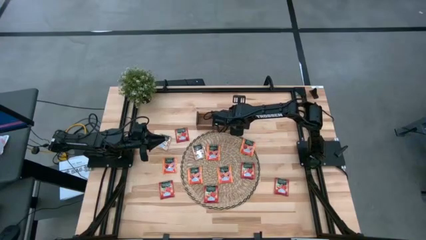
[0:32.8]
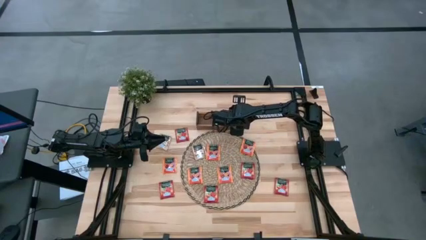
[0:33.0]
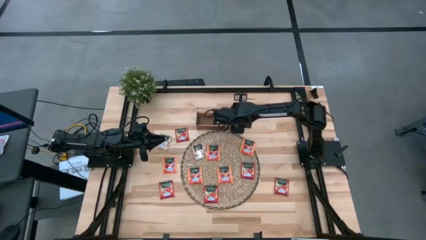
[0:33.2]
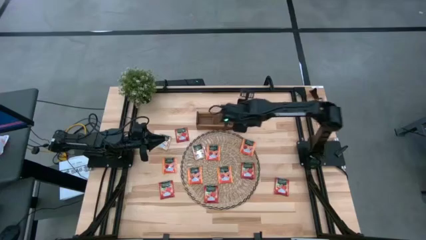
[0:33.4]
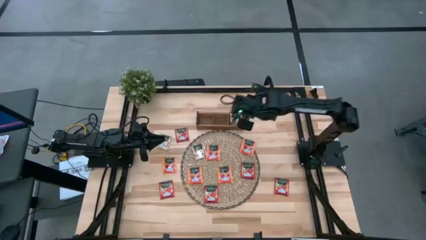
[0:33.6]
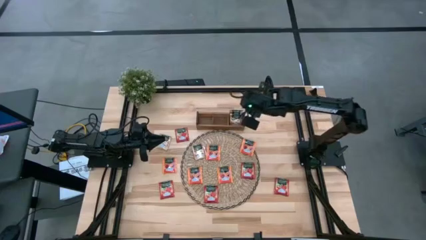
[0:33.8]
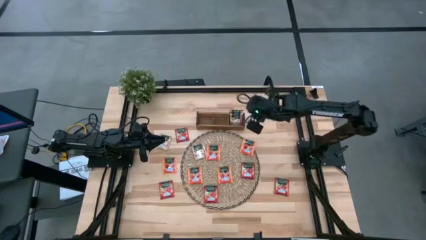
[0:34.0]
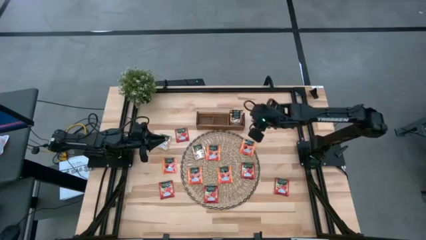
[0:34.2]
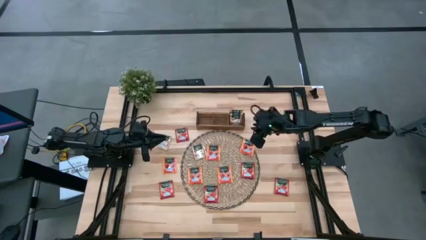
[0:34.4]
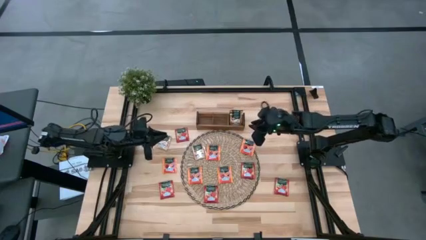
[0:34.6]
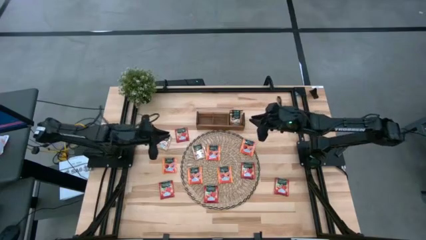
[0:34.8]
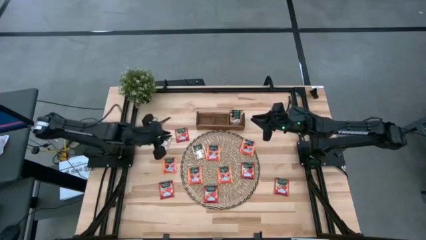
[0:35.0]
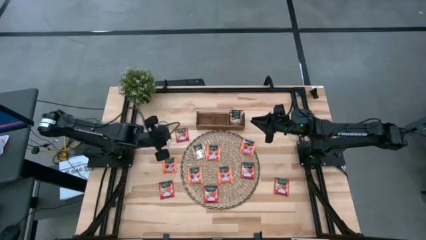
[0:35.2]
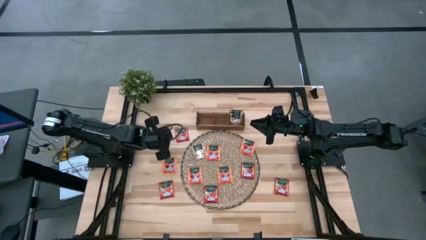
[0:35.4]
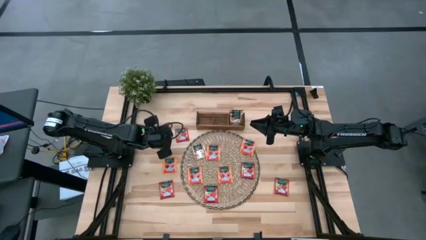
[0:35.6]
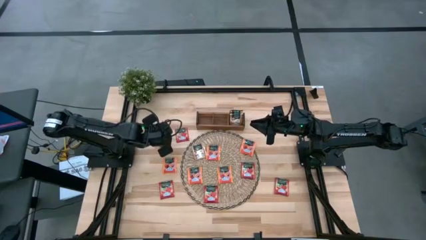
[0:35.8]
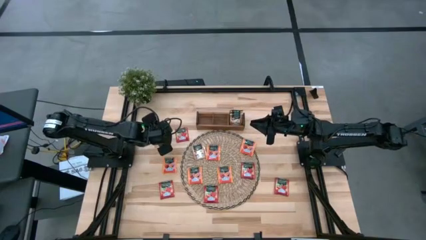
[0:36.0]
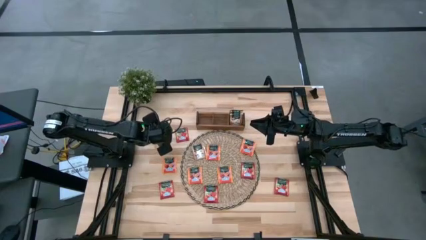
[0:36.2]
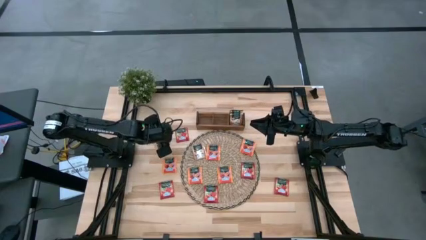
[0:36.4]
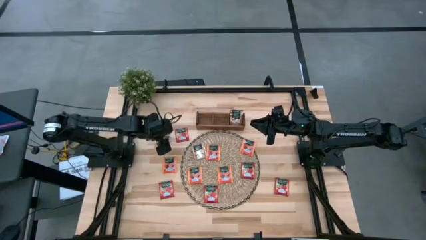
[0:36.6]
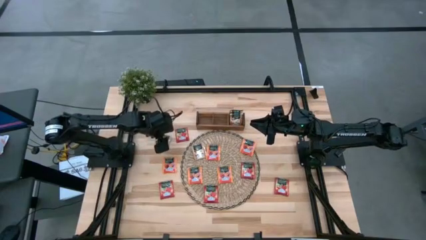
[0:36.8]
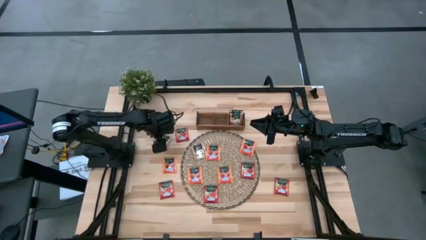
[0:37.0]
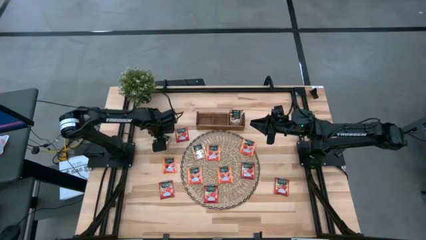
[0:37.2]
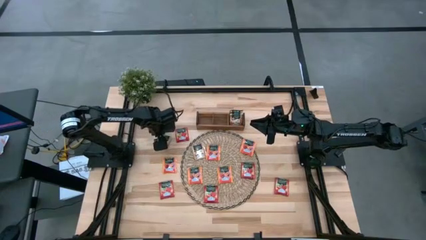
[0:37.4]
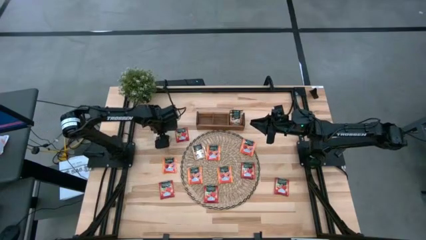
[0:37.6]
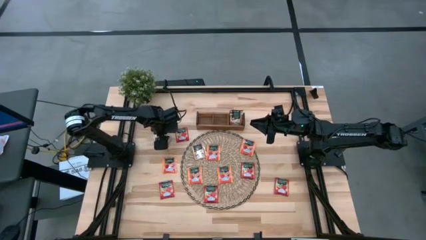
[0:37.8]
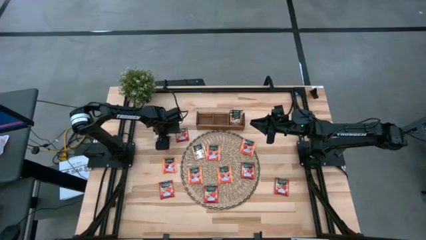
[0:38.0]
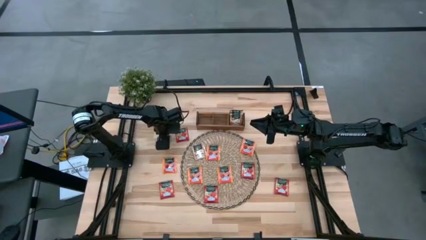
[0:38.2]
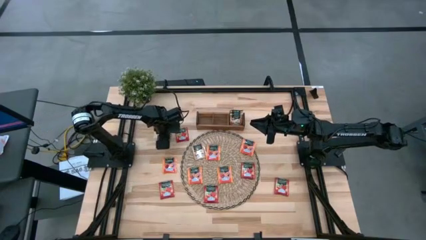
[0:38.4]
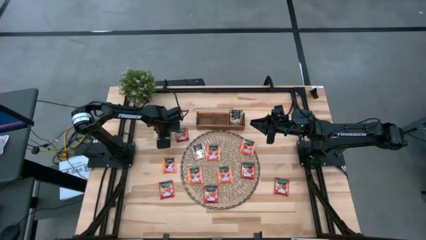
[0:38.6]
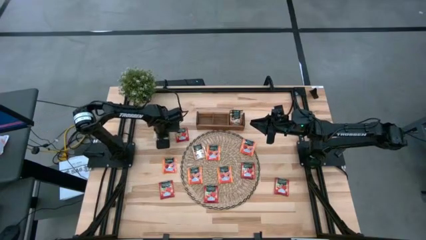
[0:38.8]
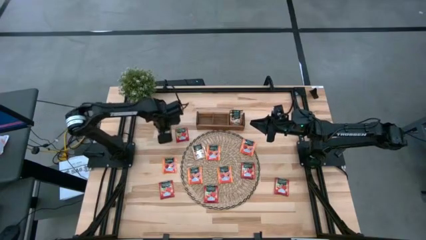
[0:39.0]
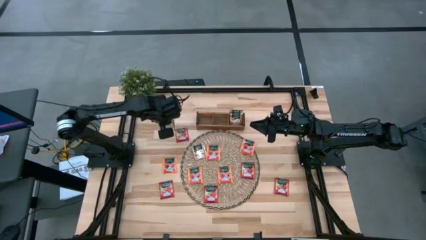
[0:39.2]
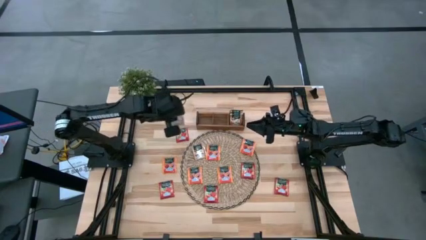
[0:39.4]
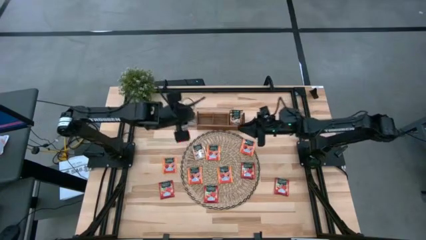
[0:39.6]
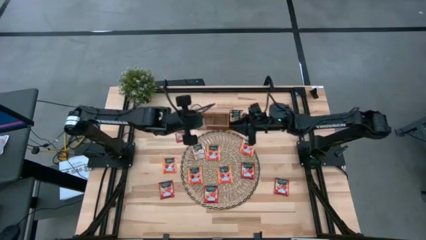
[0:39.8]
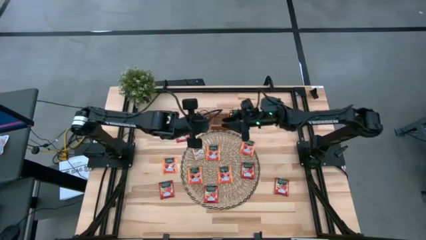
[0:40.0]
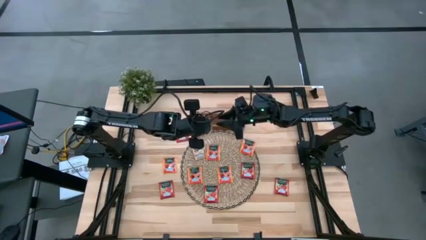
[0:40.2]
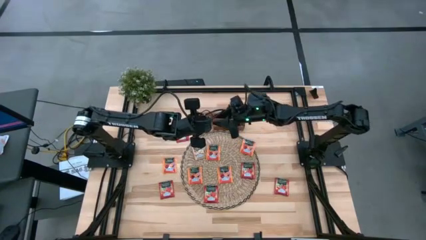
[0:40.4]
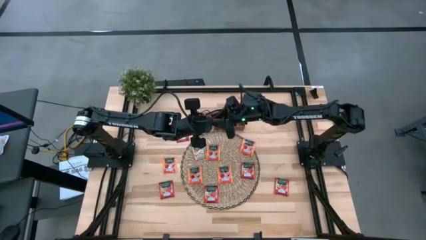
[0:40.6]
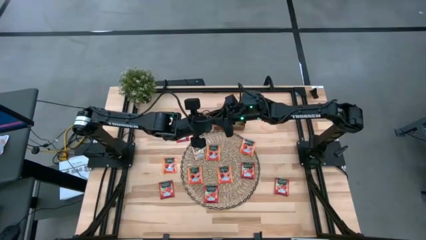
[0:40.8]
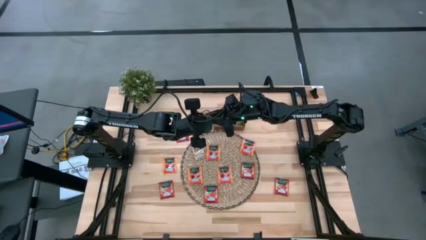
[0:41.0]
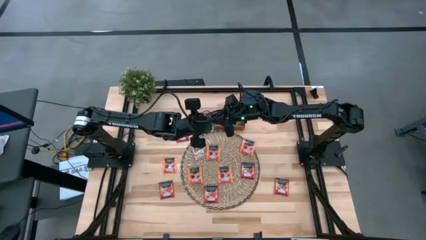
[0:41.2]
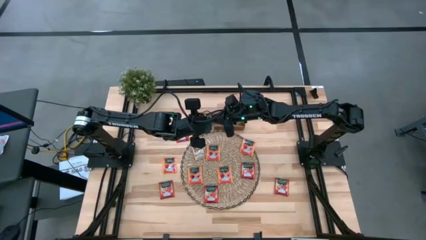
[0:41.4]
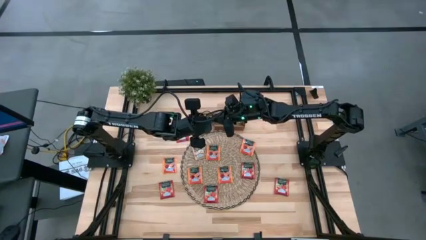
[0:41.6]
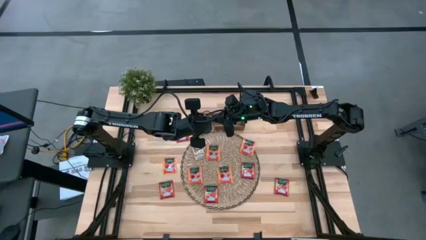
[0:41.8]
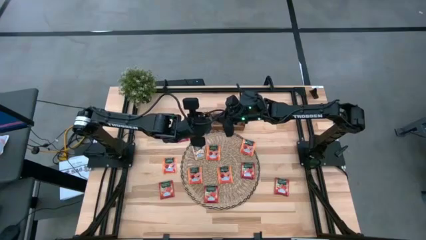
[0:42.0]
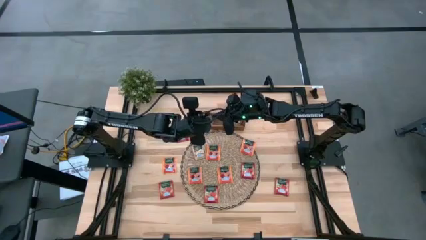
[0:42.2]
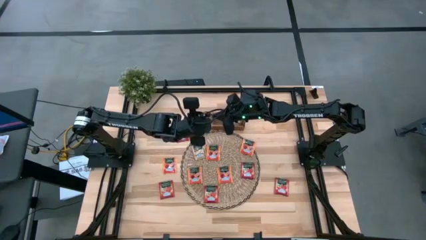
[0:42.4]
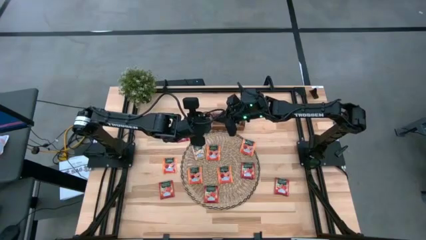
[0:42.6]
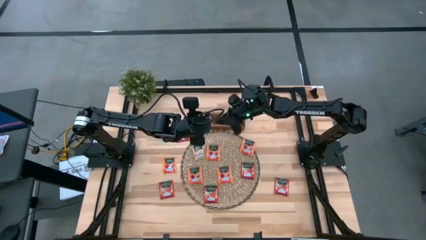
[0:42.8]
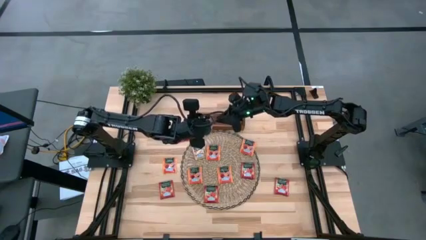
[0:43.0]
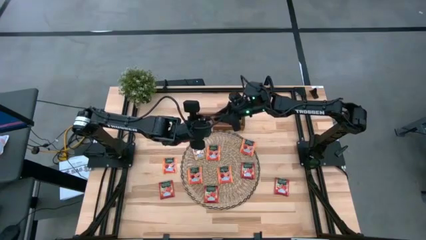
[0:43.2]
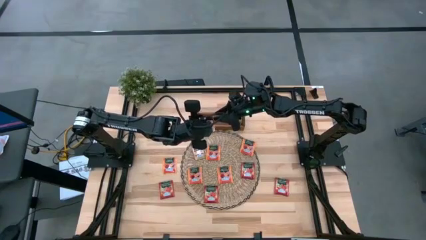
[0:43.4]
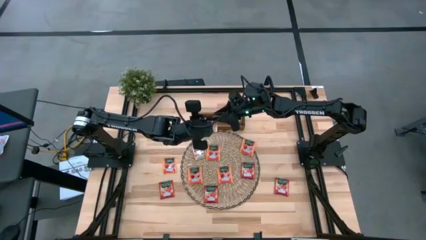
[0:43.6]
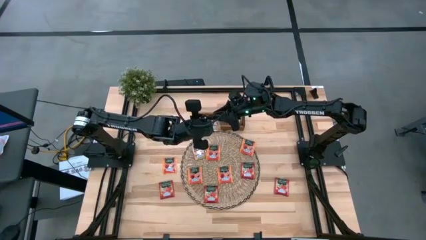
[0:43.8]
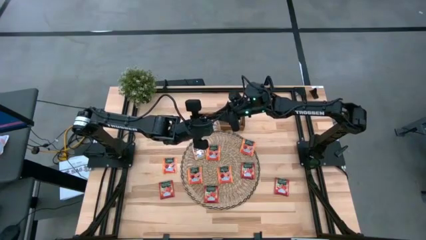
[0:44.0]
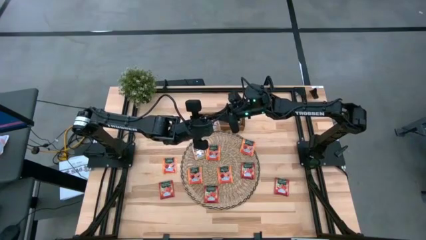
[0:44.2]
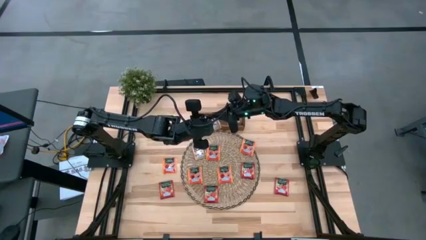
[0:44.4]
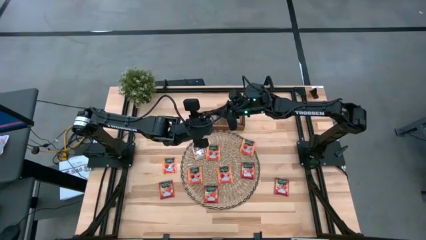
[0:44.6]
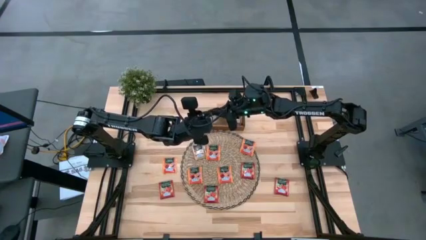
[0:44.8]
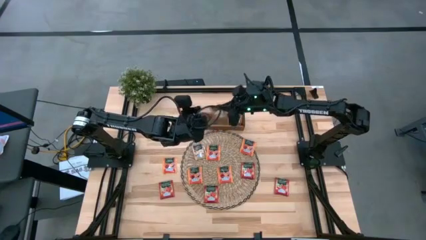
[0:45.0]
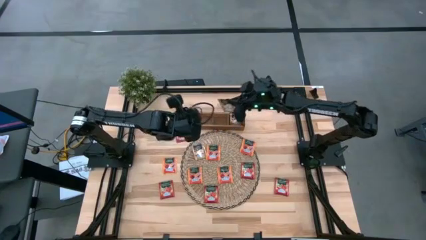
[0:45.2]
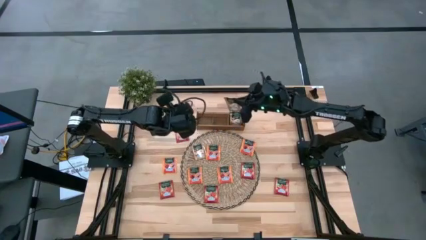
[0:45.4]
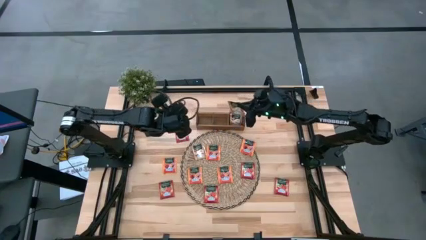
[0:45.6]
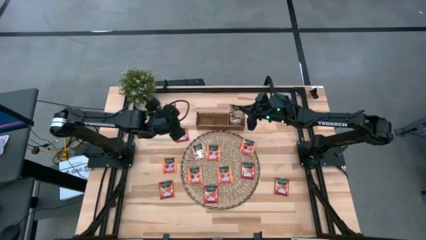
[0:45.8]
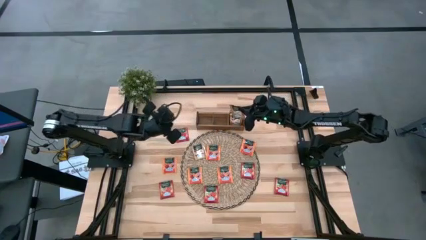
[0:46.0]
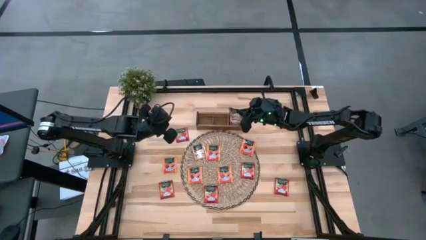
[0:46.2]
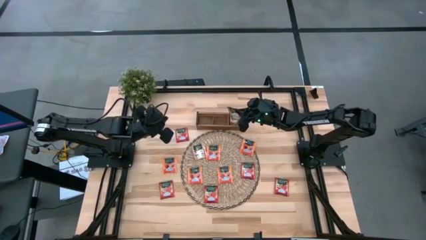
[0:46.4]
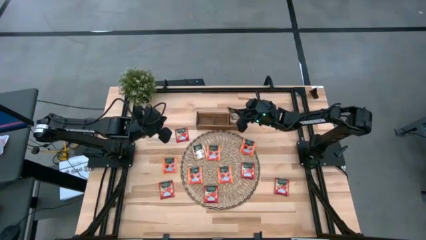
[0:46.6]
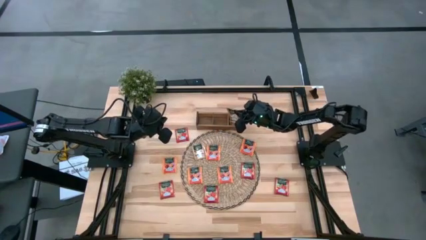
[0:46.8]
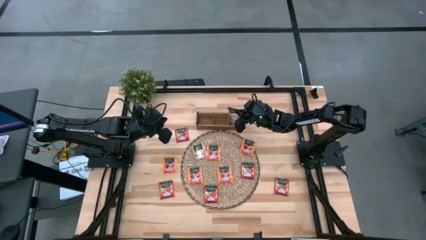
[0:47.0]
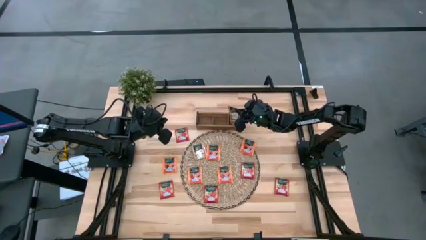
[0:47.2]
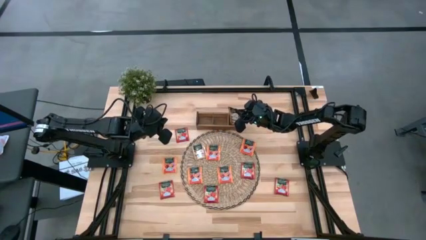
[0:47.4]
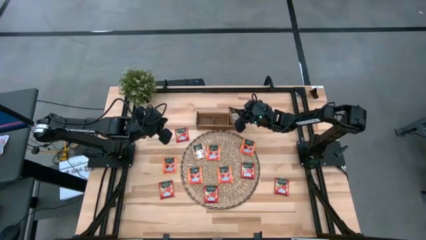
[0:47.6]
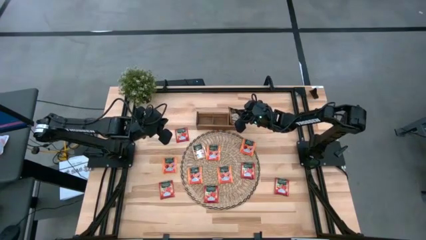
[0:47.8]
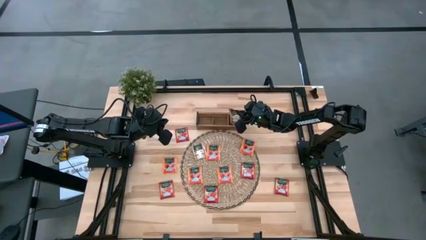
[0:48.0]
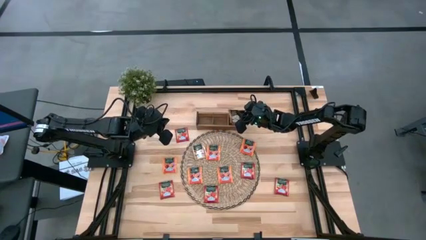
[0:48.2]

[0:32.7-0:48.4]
Task: Pick & Place Tea
Put the brown tea bag into the right section of the wooden organizer
